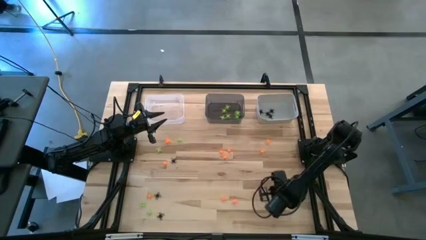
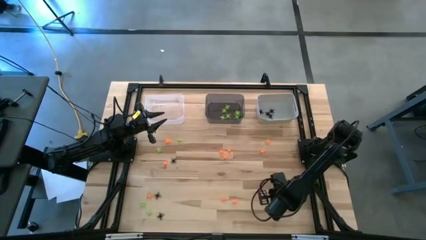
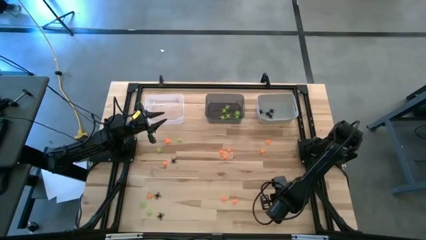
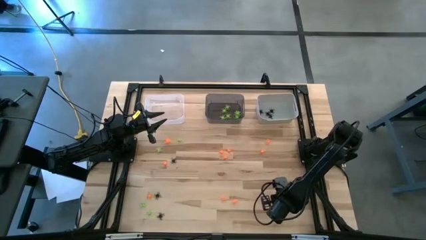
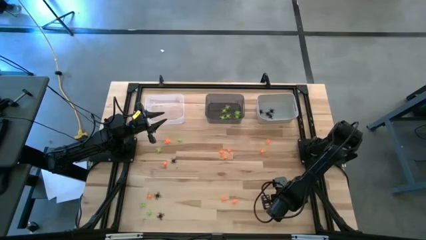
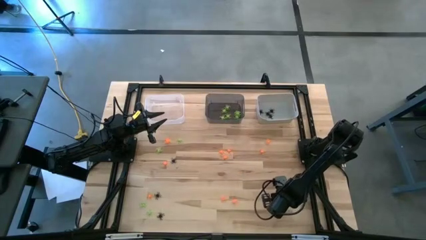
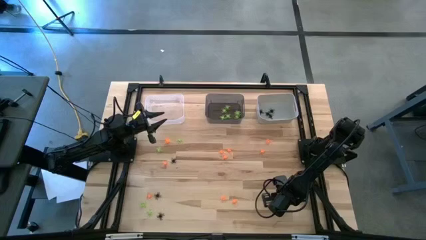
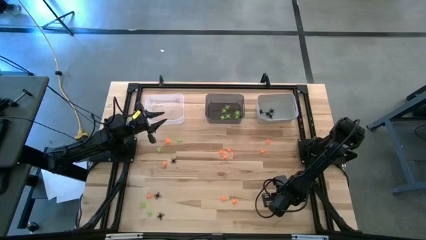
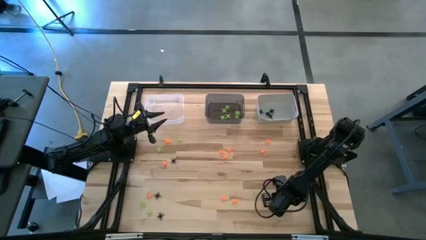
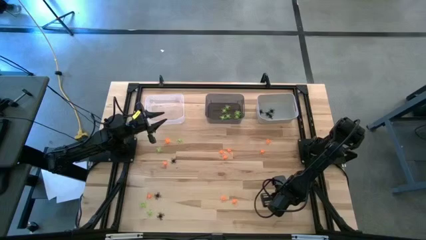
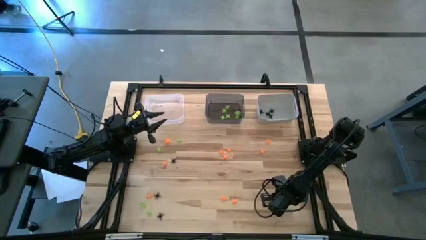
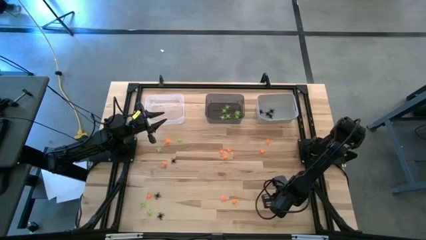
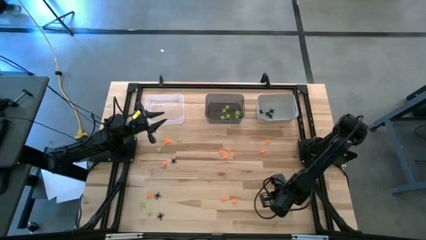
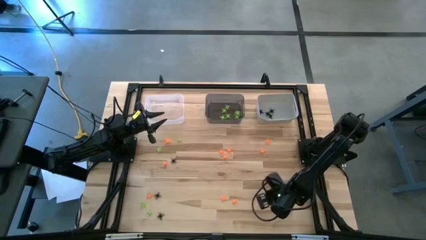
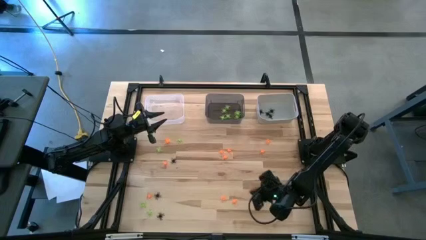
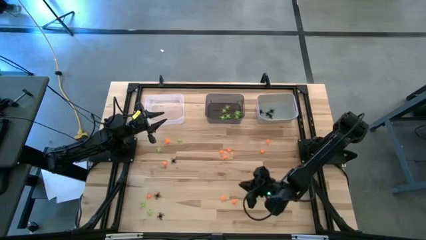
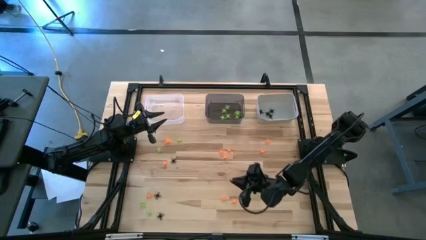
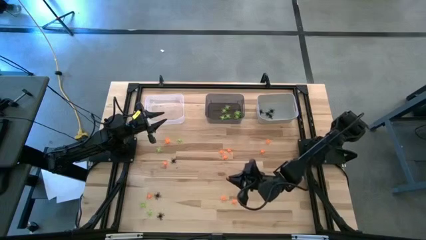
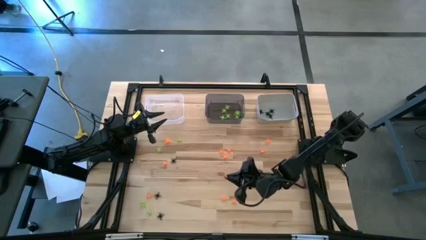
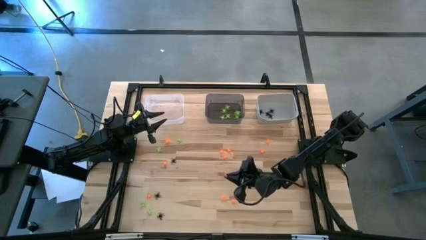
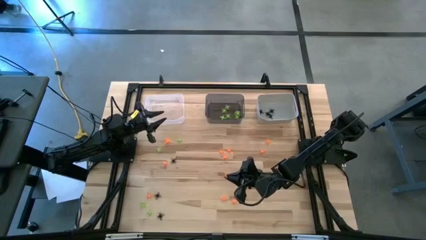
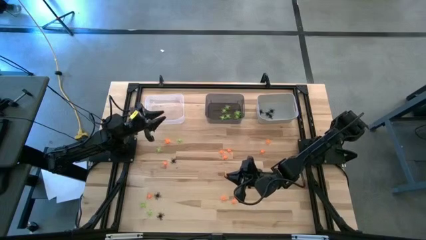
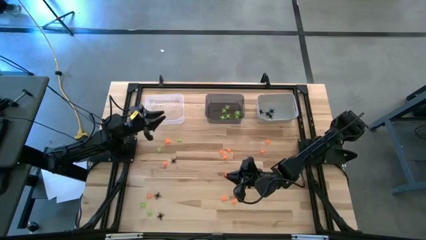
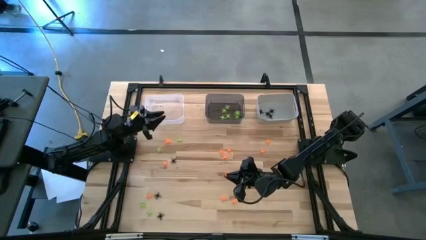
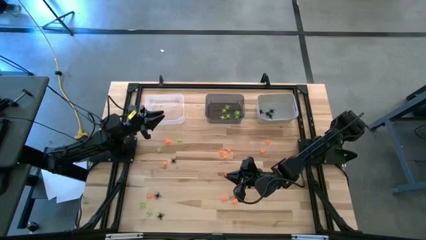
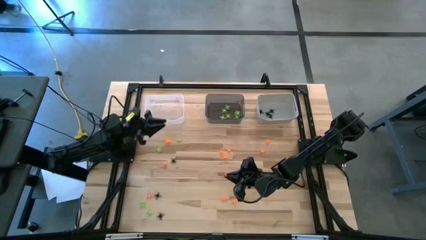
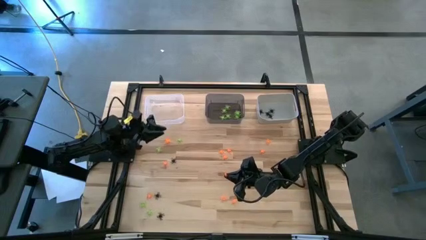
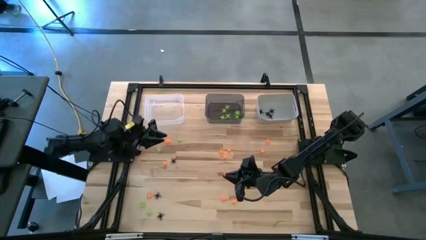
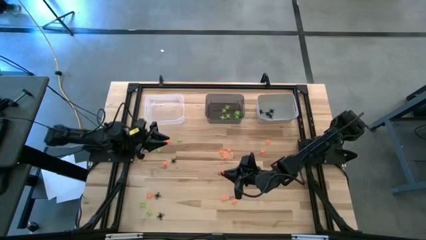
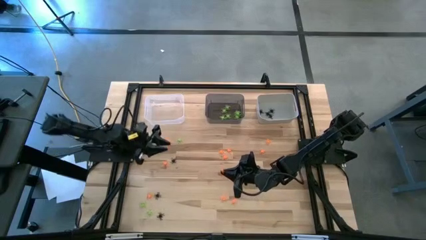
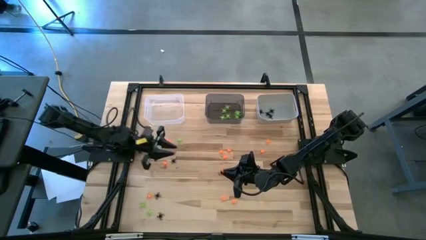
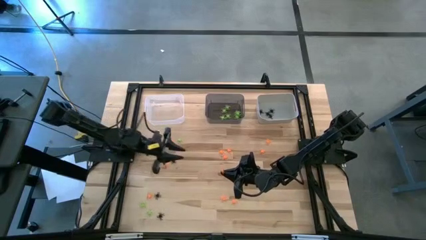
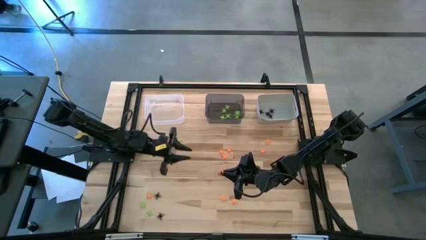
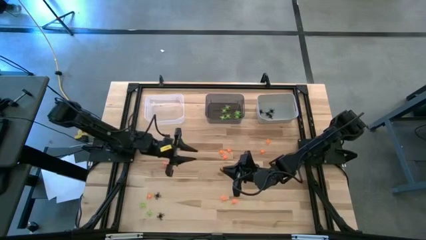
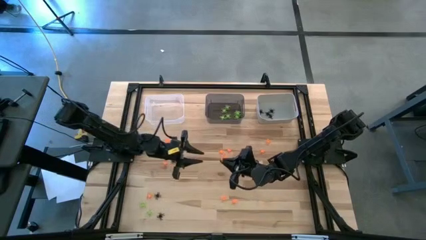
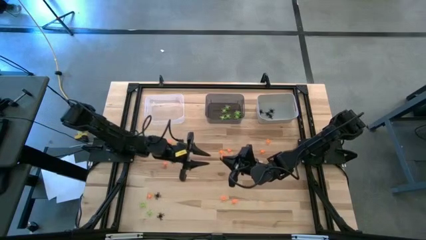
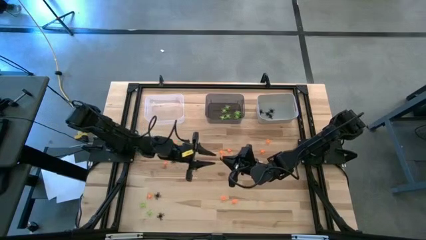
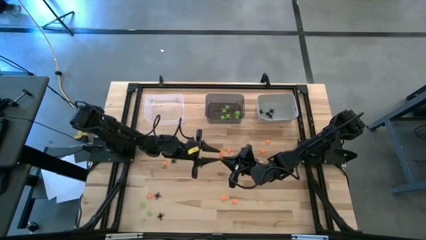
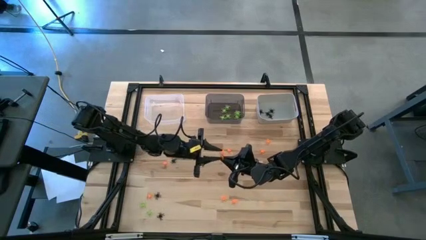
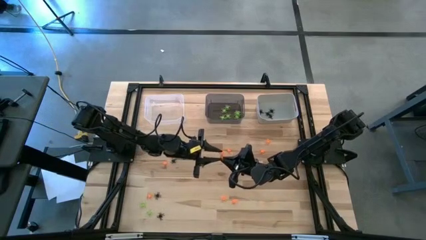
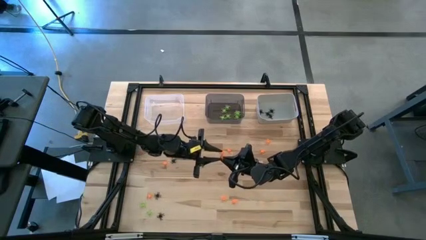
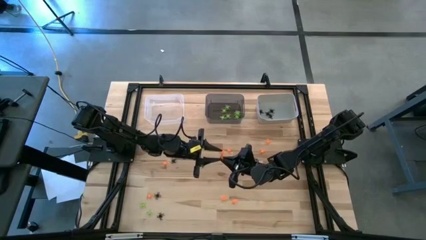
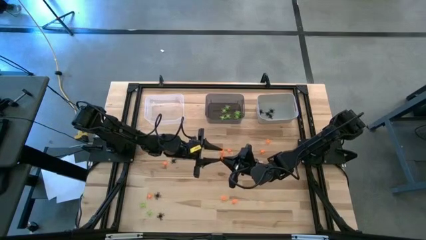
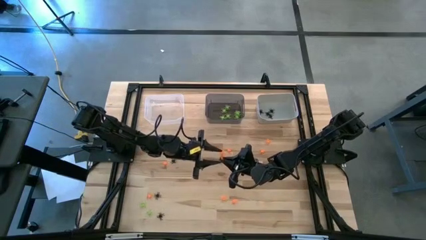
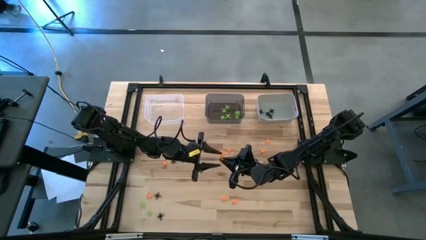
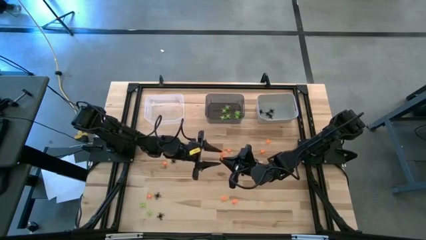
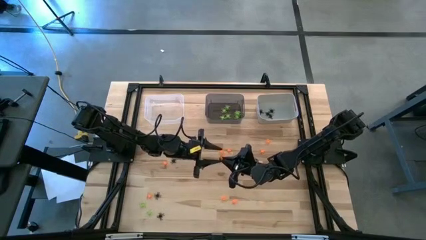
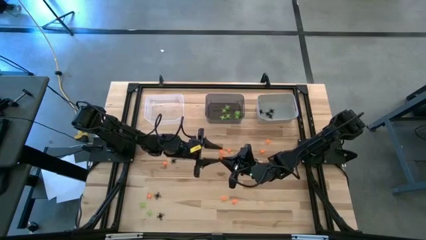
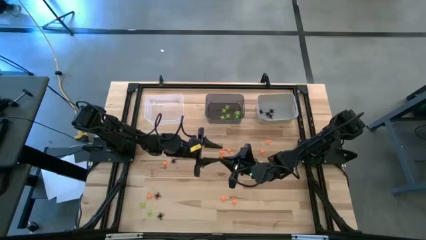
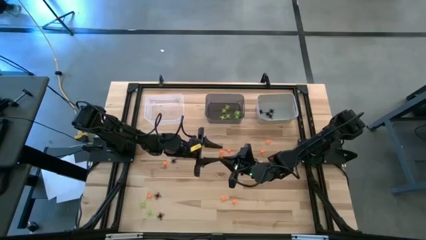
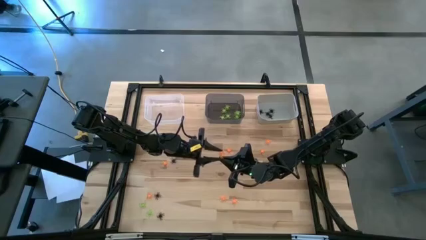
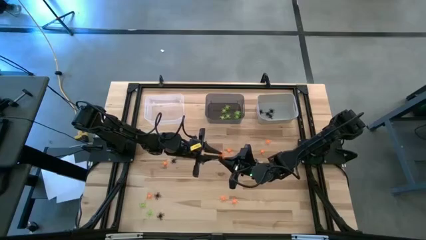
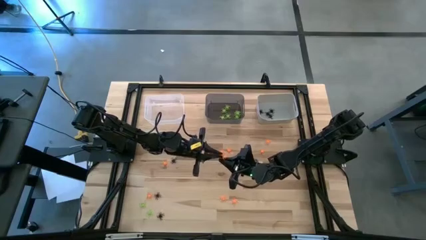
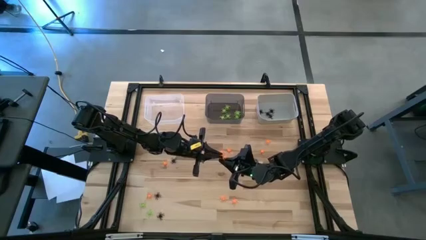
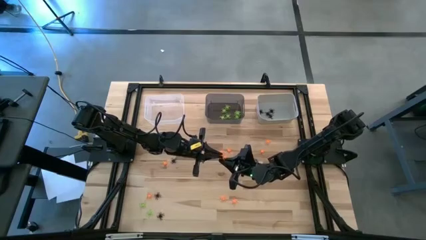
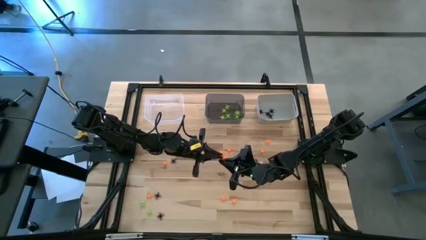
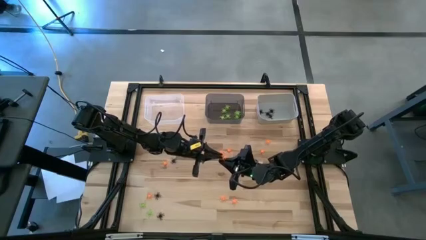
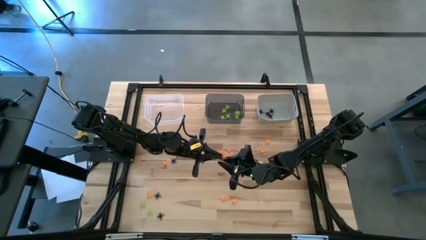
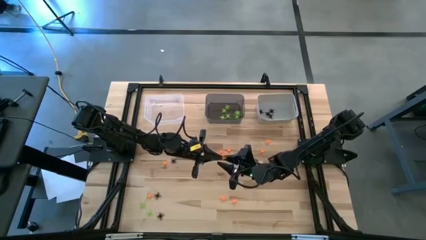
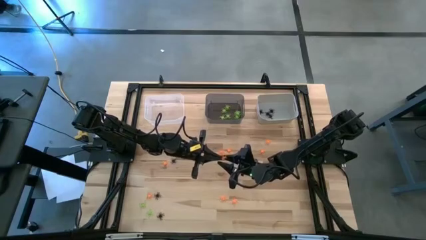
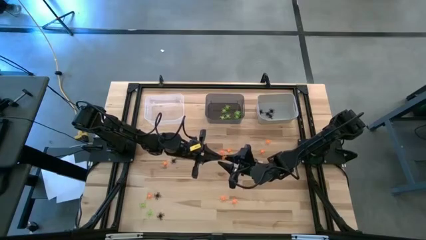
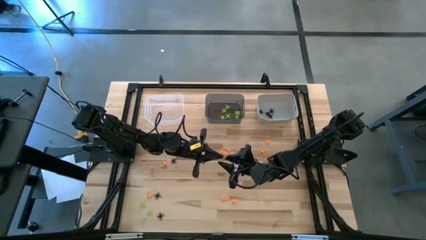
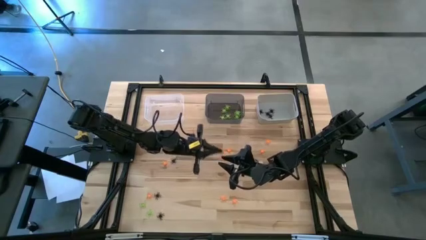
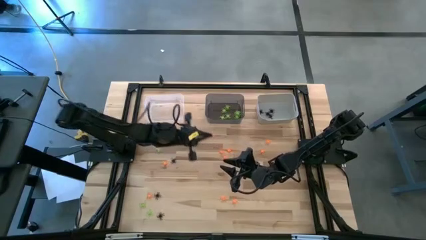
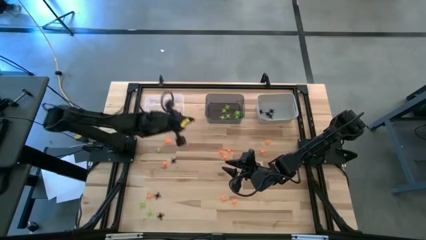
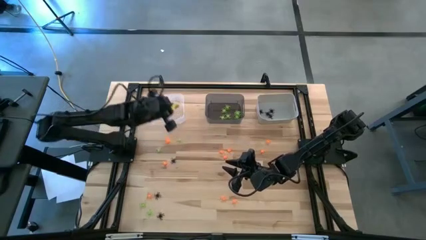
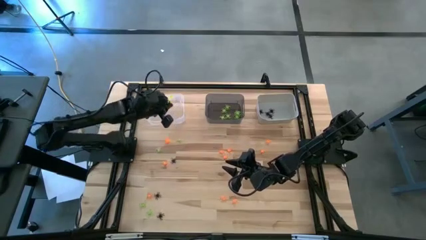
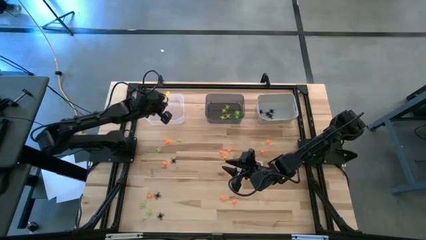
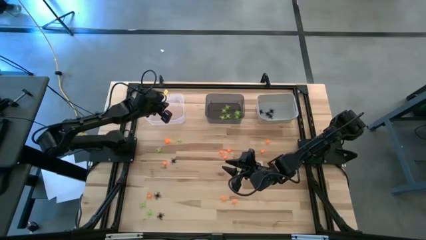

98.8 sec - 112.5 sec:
Task: Sort Halloween decoration
Put the orange spider toy into the transparent bin

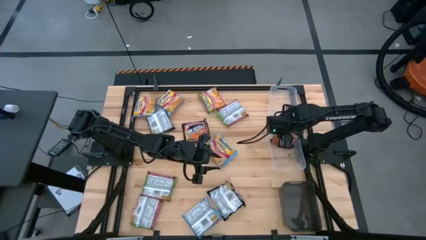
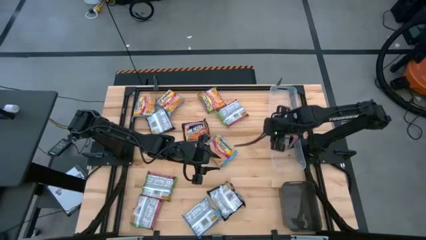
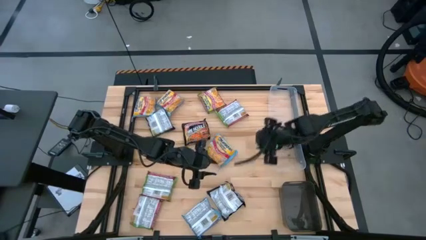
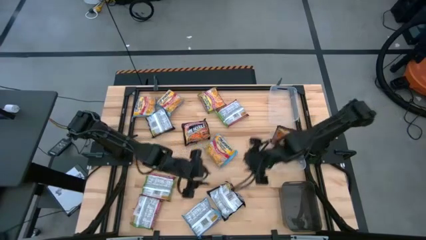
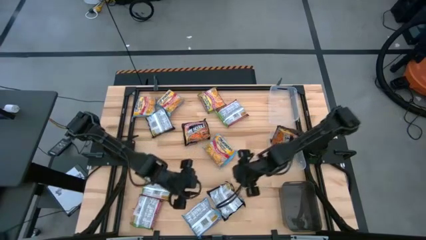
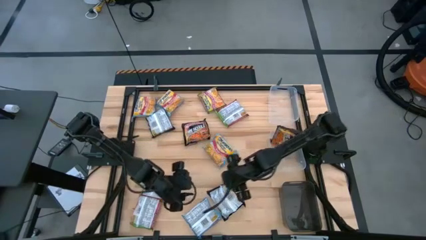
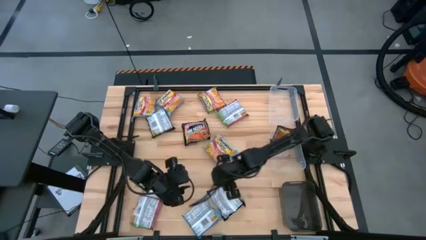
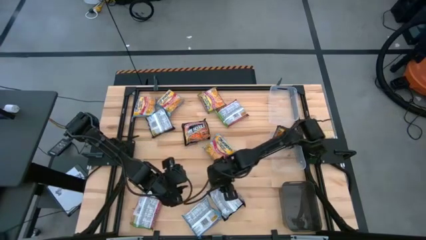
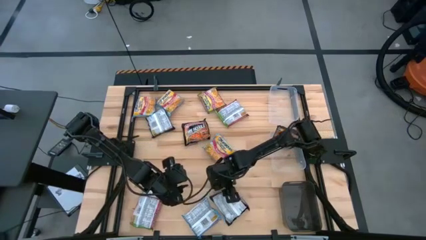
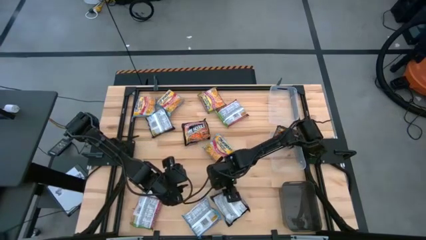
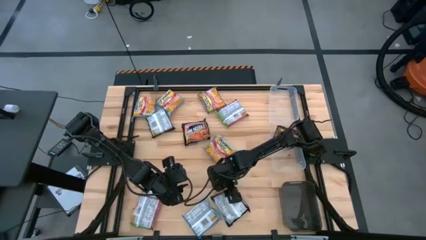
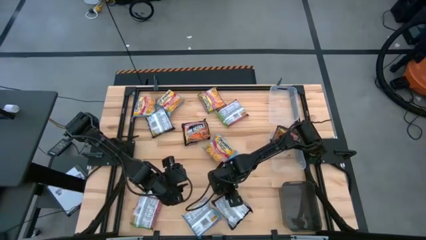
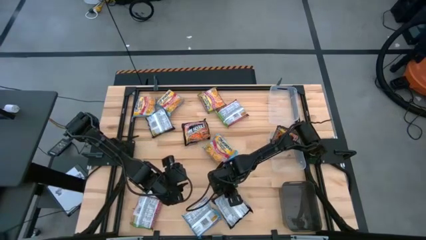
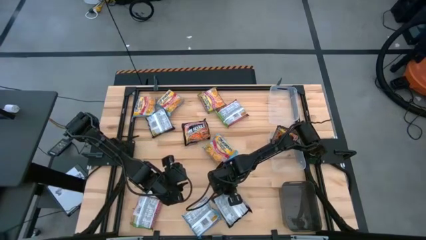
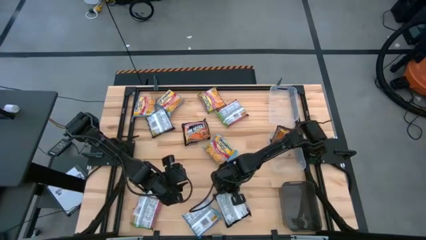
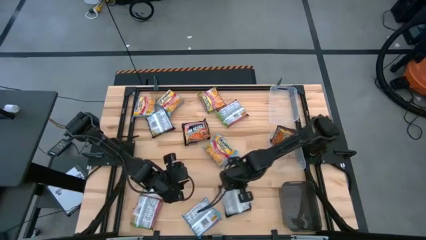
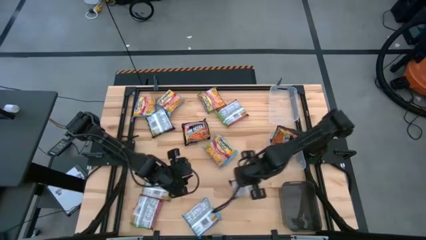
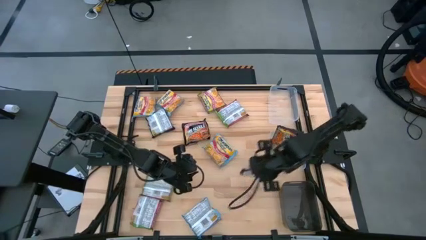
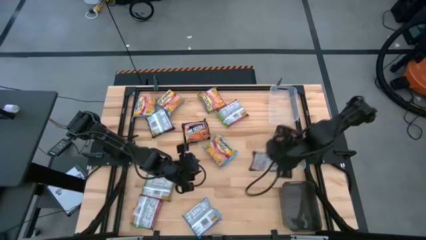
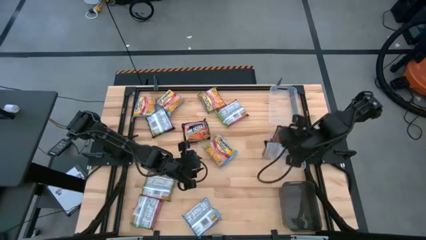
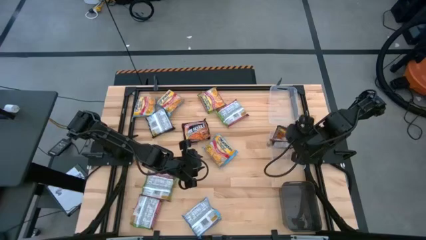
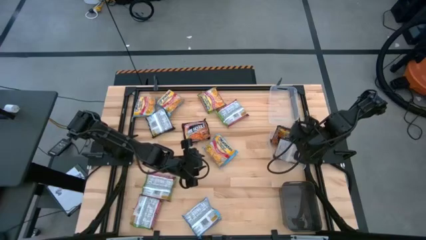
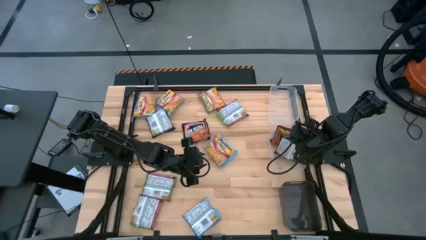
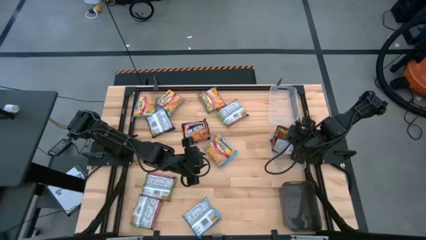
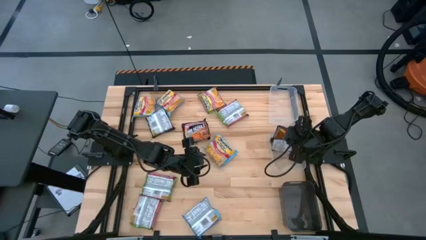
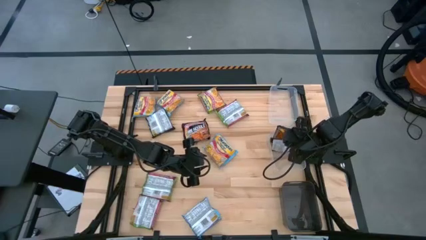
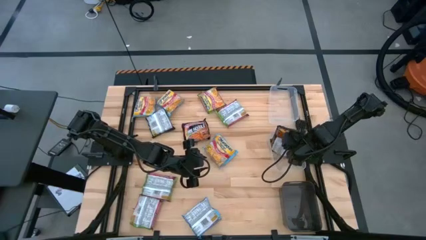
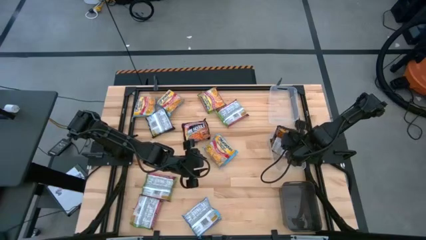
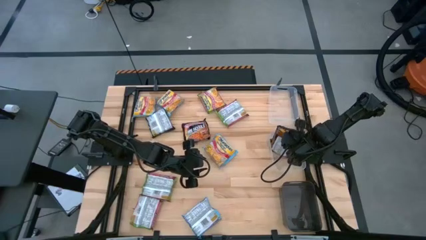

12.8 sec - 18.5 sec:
Task: Sort Maruchan noodles
Put the black noodle pack into the bottom transparent bin
